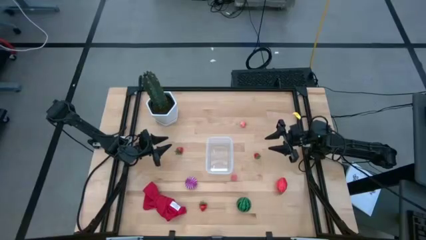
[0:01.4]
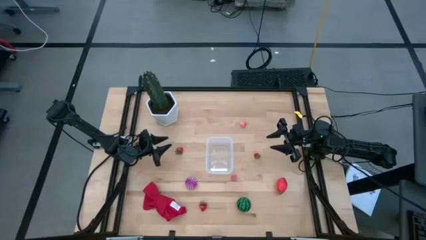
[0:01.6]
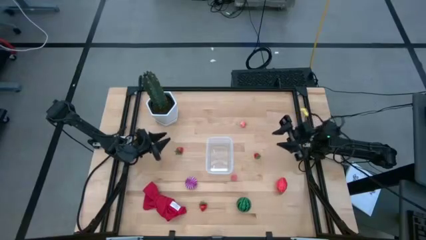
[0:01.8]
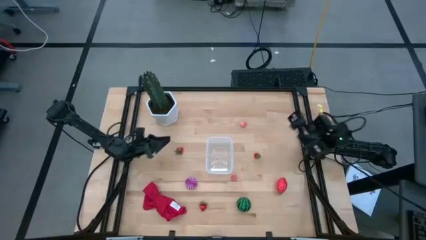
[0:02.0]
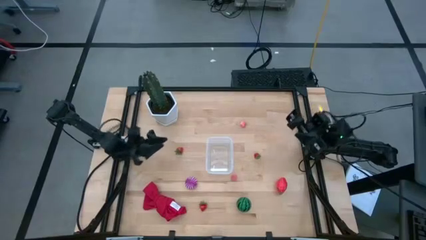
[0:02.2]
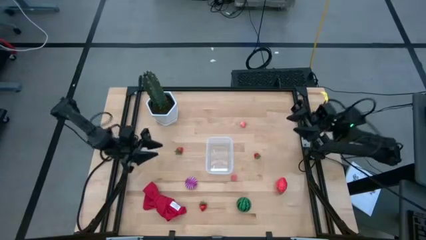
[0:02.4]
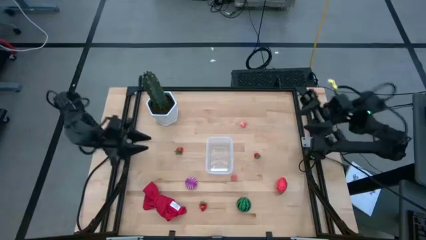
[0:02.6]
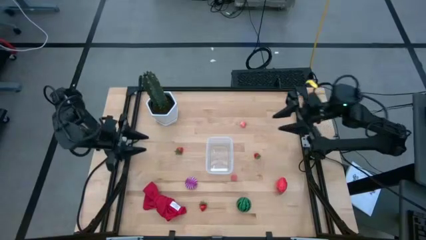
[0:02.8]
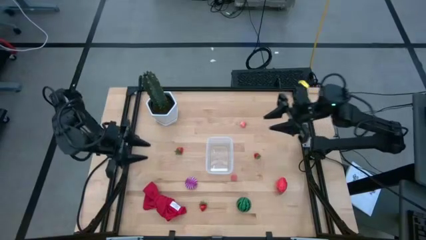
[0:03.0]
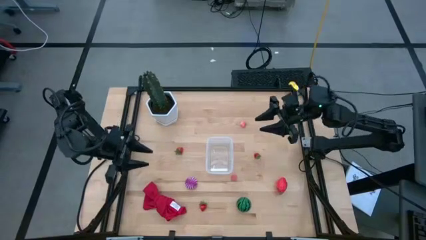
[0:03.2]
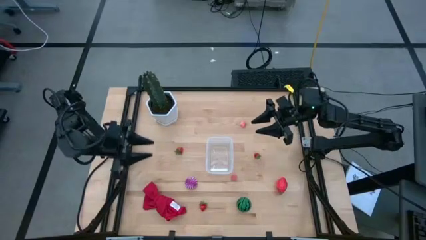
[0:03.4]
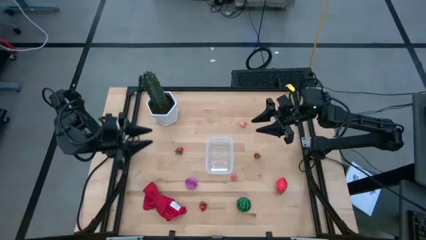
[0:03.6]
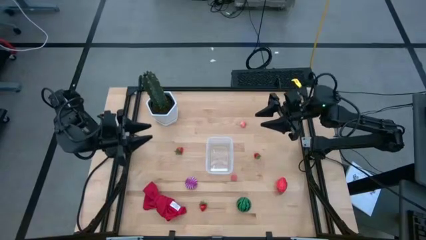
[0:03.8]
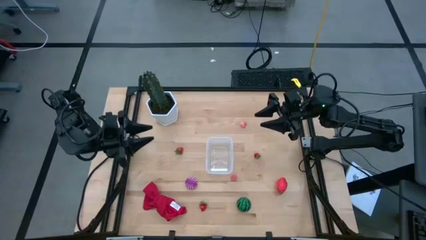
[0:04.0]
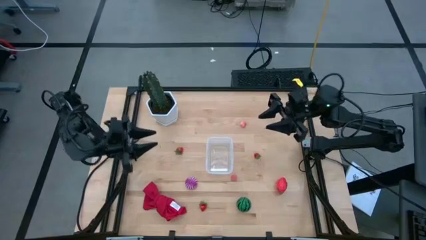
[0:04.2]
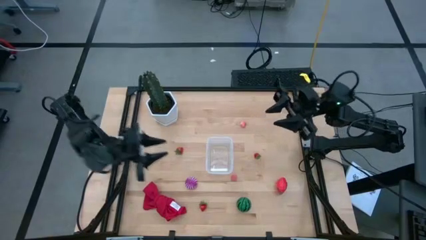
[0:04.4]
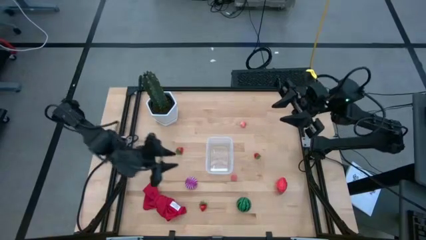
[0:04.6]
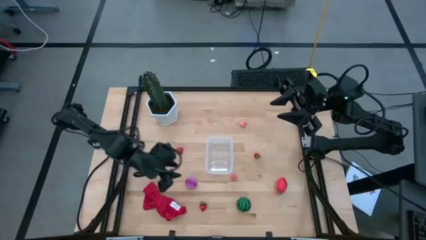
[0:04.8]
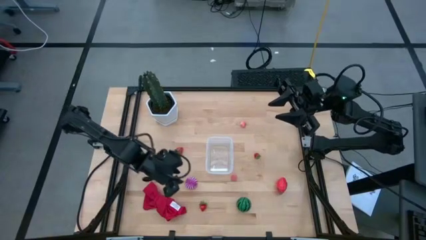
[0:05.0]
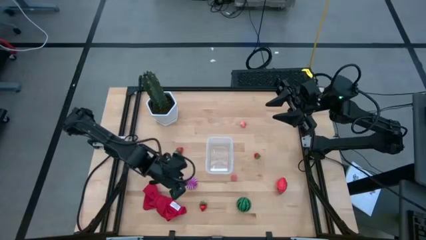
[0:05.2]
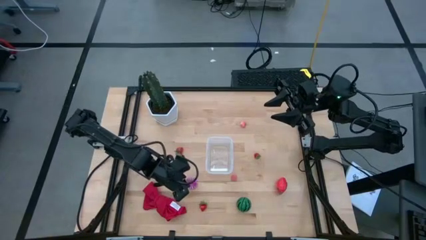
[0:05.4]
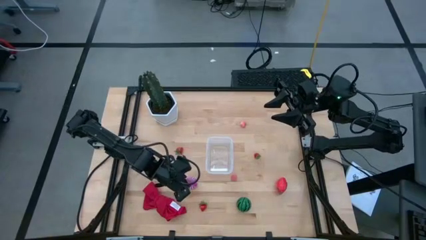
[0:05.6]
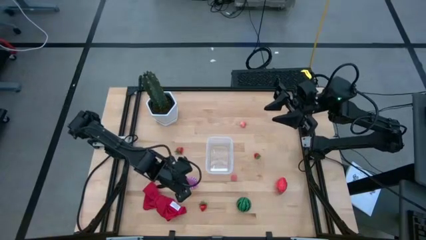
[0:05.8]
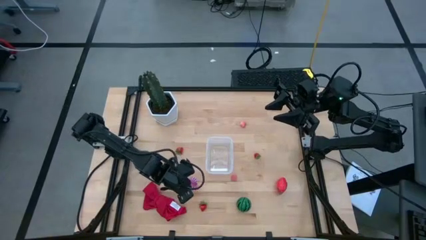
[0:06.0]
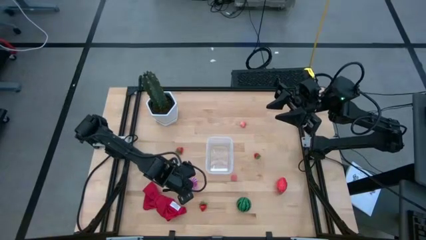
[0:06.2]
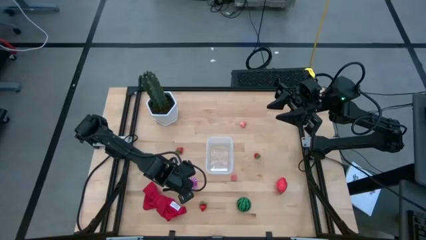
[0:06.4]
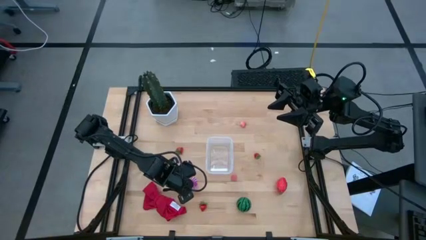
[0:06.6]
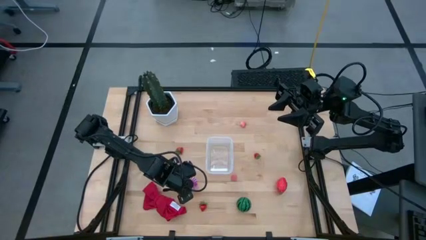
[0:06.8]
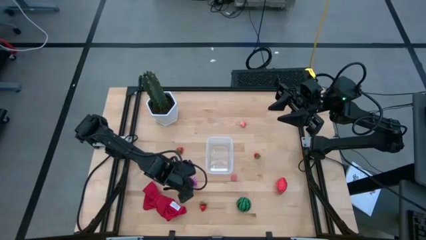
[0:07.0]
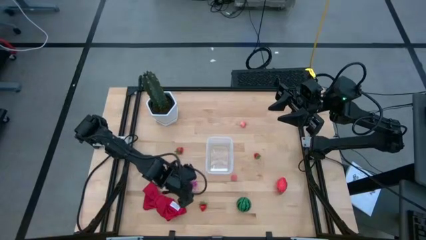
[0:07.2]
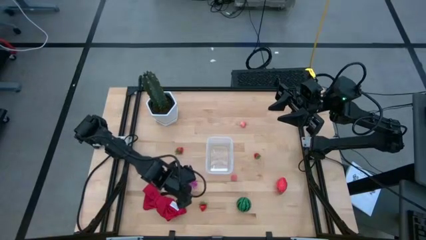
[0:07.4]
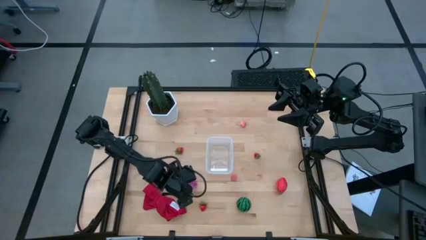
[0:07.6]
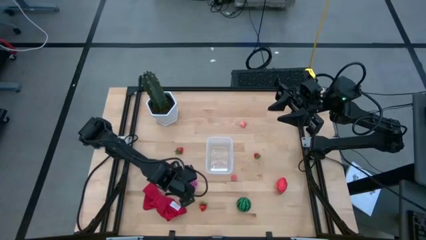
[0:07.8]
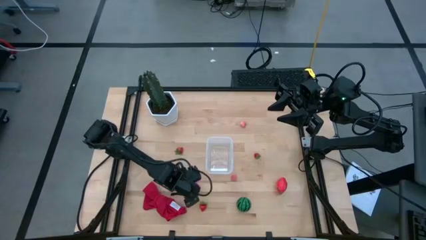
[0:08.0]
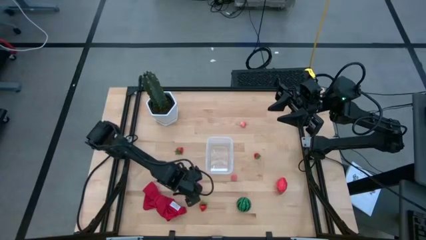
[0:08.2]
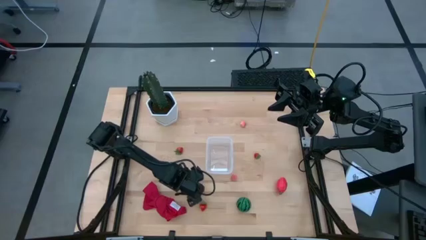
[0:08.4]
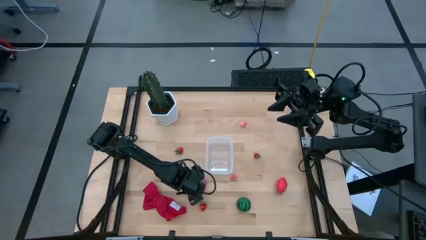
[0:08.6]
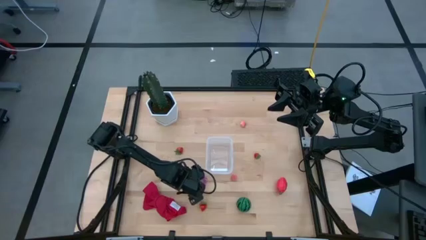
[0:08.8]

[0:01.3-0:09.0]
Task: Pick and placing Produce into tupperware
Put the purple onion into the transparent bin

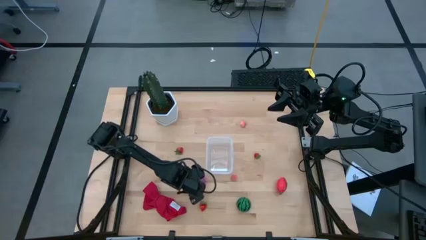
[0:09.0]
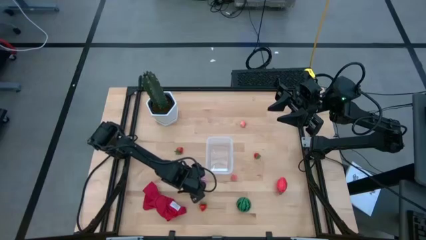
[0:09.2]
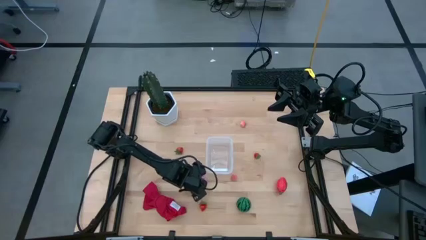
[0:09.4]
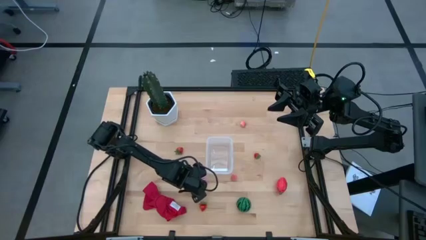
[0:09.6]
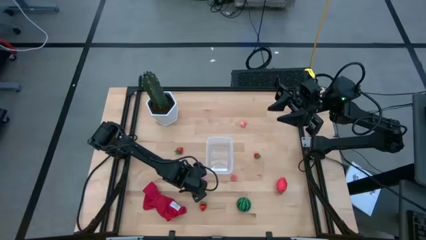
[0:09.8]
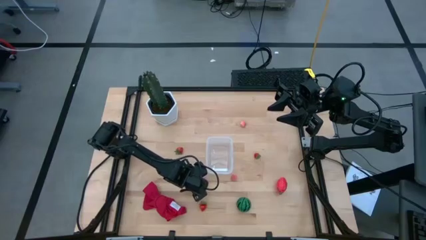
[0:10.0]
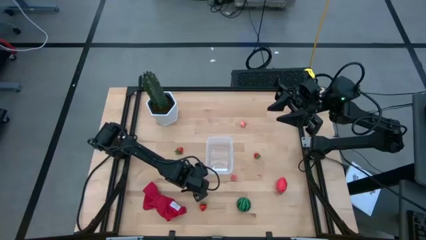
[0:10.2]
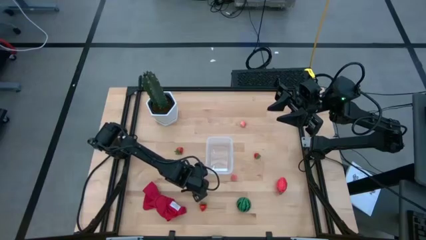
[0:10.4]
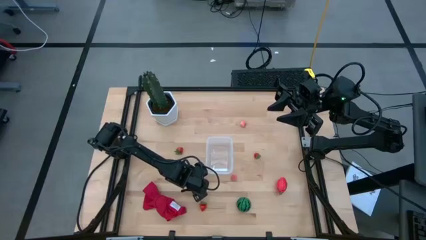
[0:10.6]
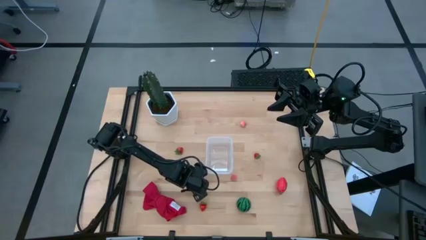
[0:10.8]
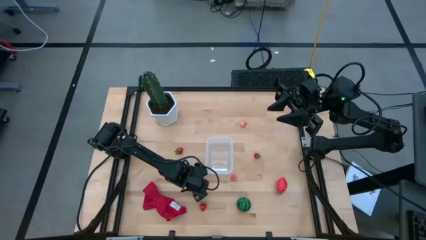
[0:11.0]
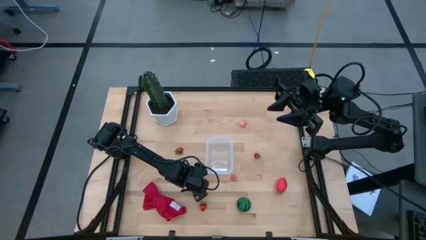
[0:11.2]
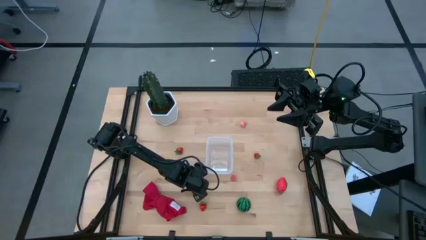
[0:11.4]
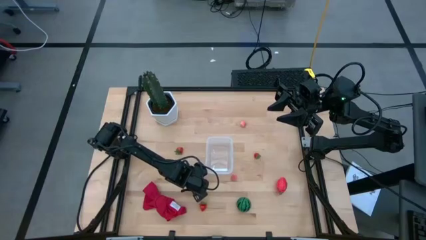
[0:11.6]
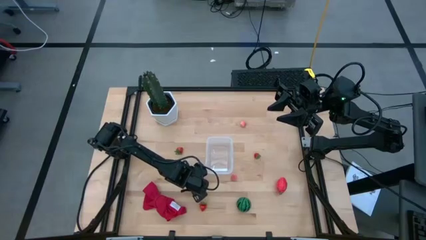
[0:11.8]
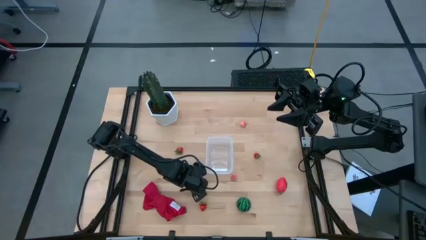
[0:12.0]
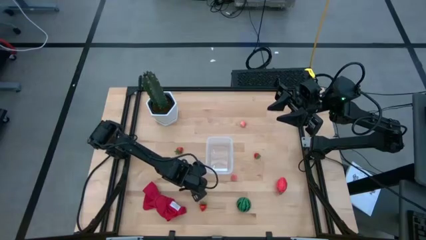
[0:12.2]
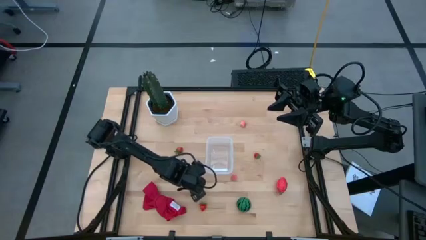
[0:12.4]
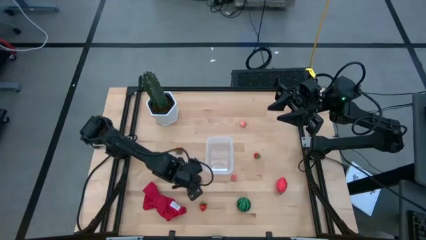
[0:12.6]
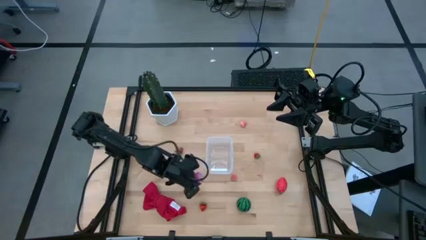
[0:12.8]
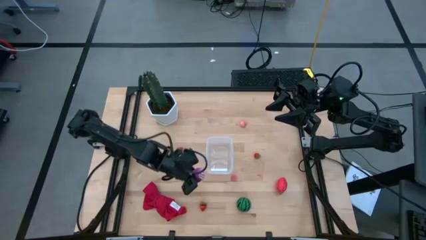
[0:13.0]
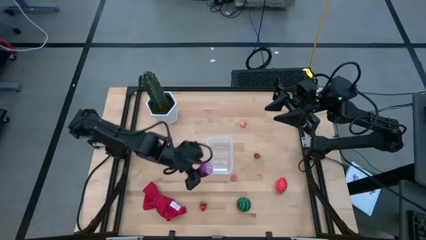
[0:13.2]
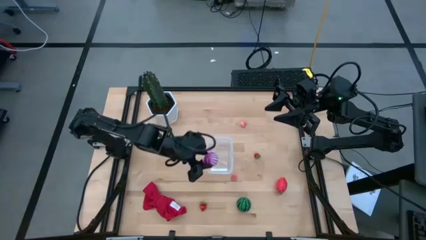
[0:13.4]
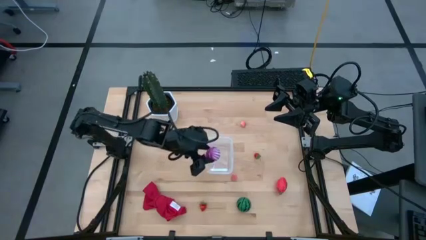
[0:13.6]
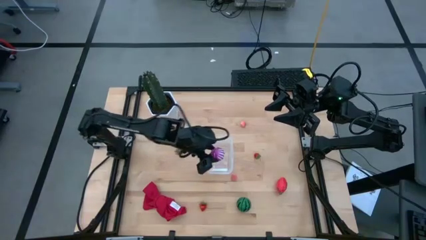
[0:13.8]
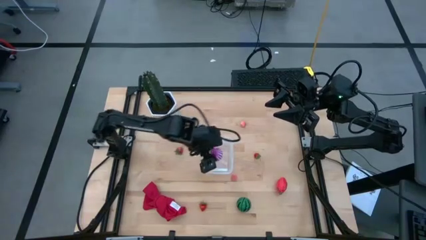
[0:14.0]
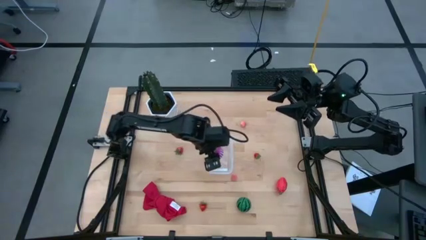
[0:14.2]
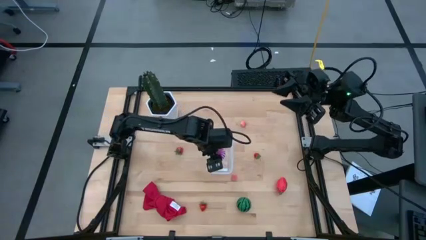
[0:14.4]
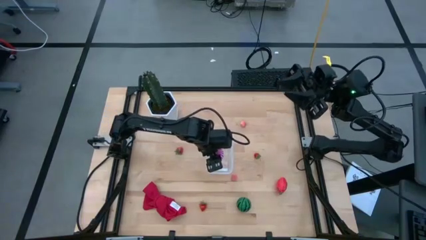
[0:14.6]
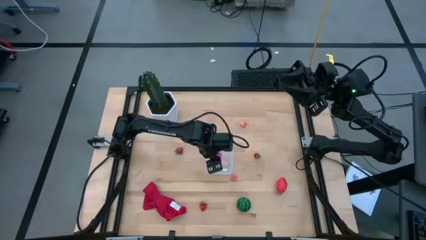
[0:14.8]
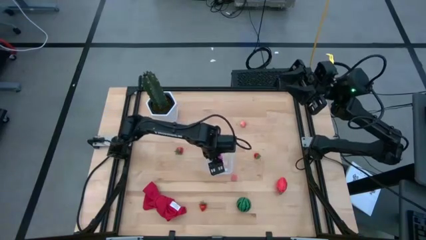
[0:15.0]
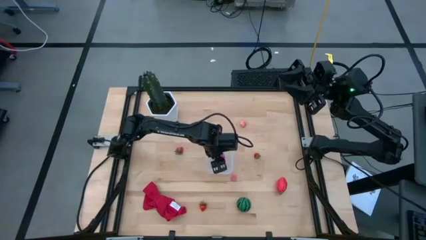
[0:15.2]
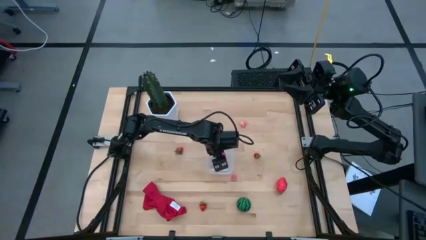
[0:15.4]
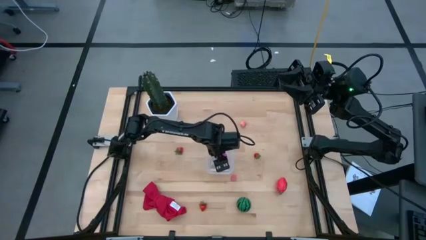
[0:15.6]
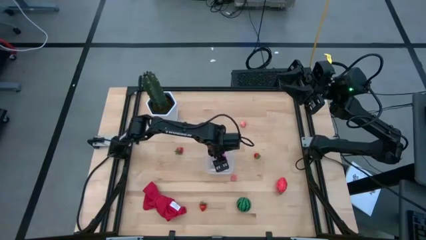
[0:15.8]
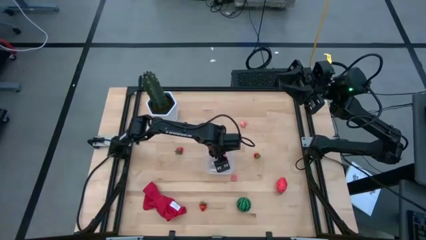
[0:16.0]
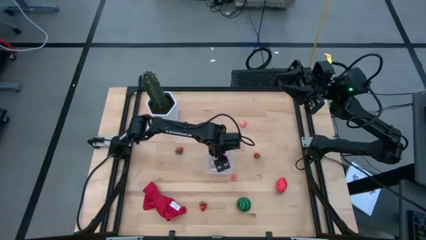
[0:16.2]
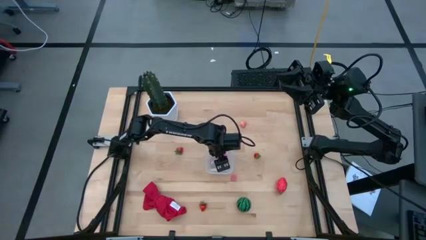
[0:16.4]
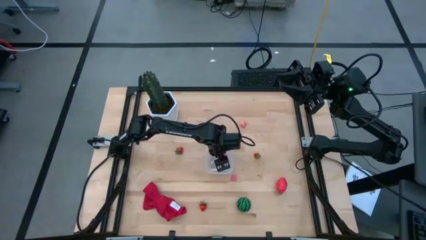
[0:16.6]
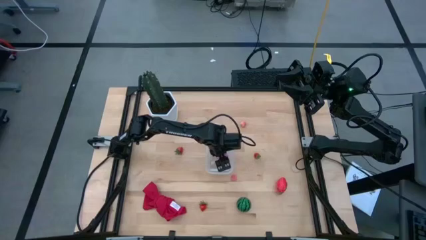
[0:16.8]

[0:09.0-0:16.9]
Put the purple onion into the transparent bin
